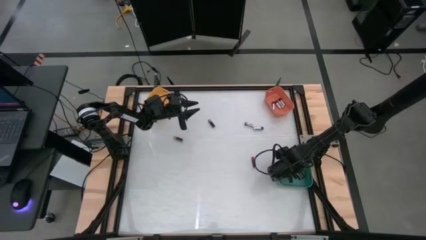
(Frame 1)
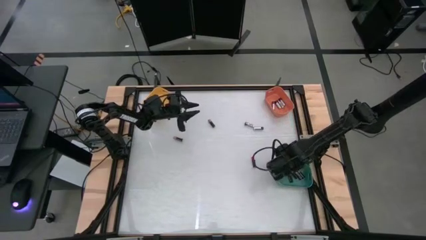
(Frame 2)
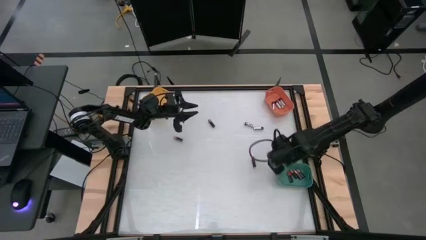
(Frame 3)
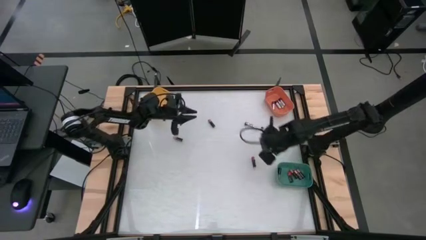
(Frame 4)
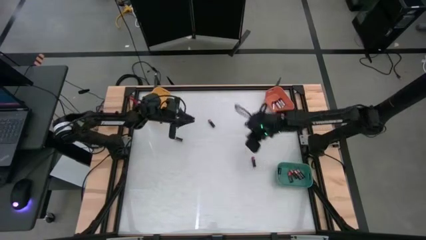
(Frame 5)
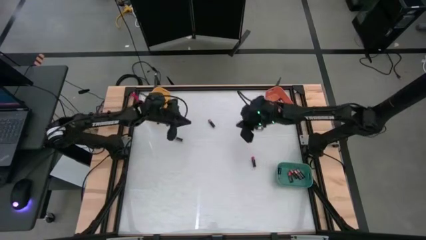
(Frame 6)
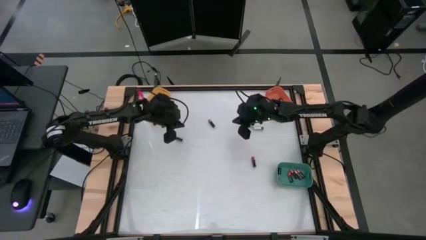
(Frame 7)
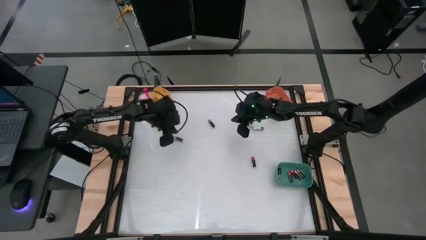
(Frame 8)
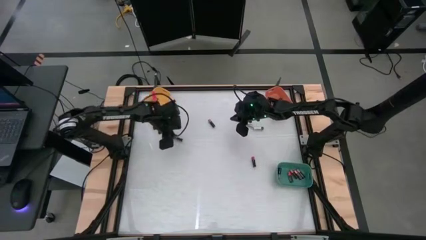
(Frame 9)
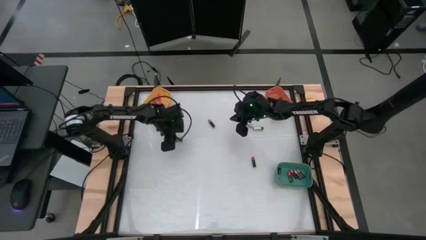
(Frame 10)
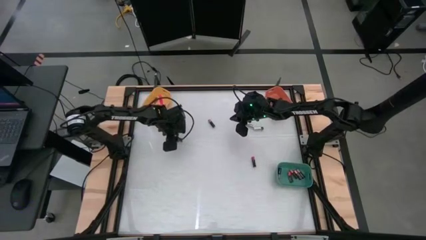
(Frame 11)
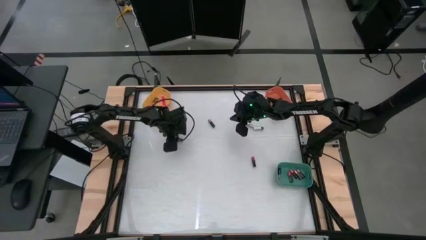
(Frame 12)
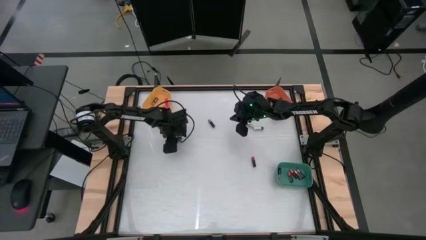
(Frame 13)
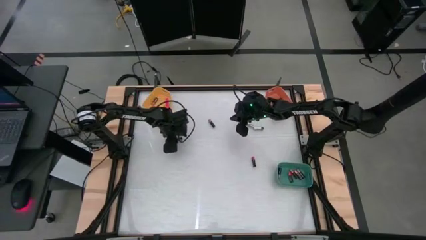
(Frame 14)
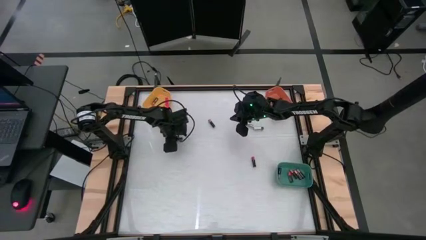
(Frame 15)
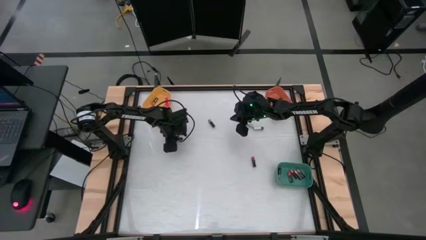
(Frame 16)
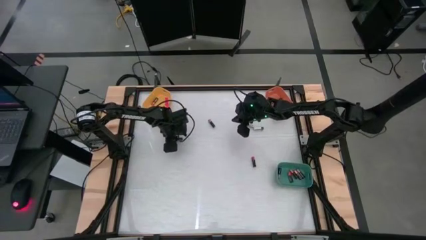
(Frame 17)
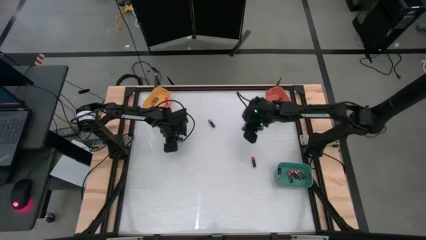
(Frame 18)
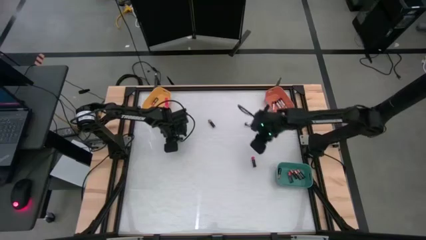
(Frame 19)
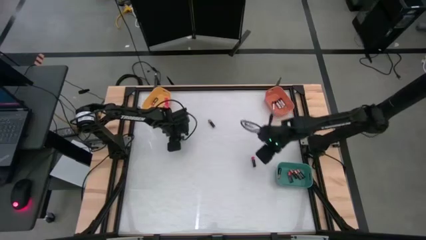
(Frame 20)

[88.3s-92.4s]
Task: Sort batteries
Put the brown battery into the green bin

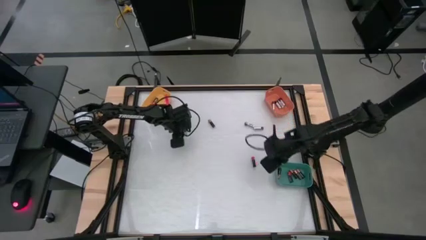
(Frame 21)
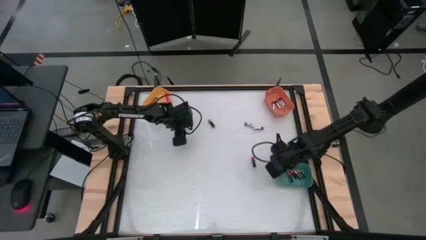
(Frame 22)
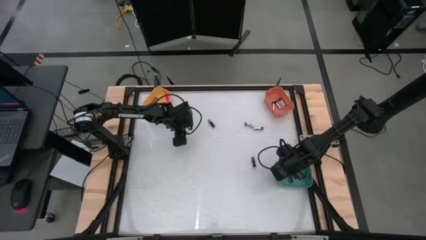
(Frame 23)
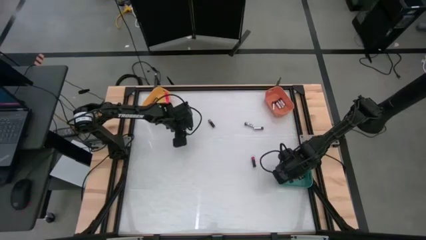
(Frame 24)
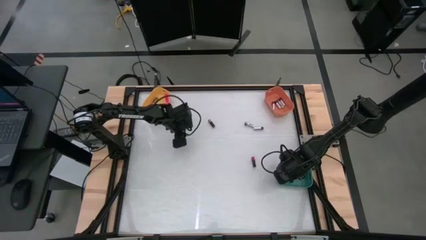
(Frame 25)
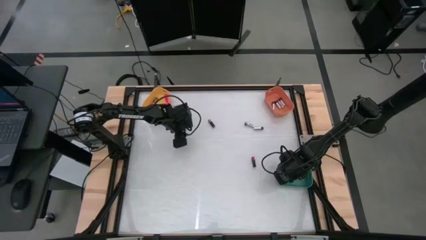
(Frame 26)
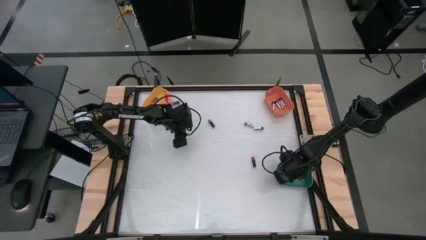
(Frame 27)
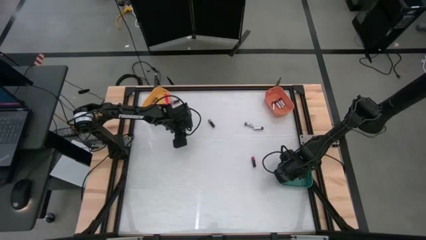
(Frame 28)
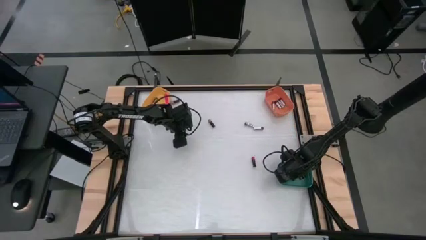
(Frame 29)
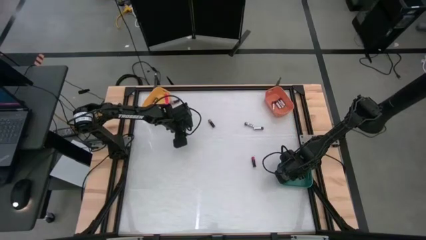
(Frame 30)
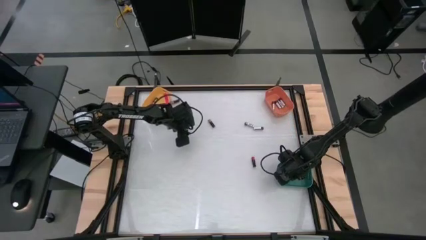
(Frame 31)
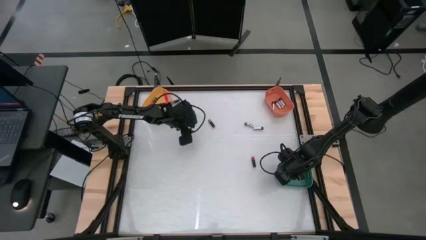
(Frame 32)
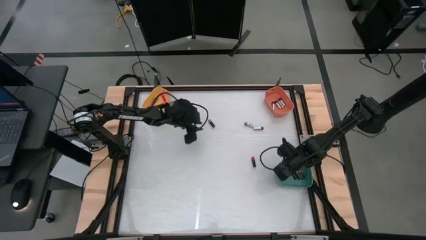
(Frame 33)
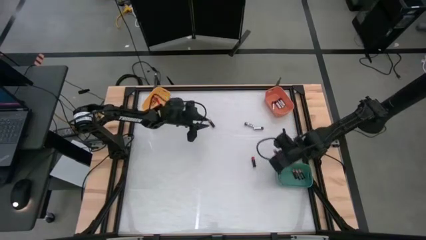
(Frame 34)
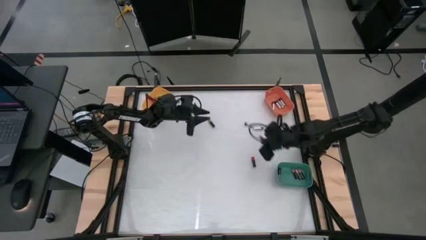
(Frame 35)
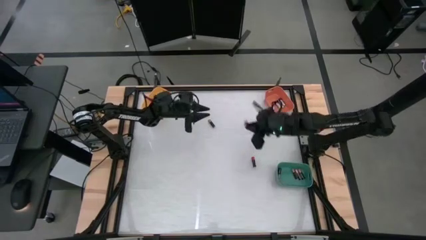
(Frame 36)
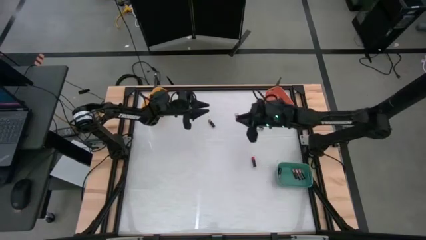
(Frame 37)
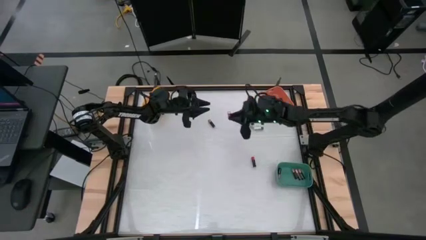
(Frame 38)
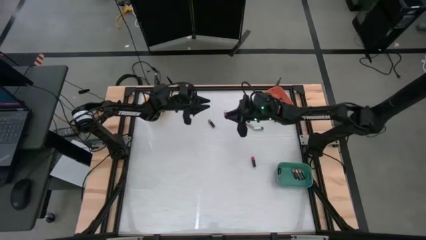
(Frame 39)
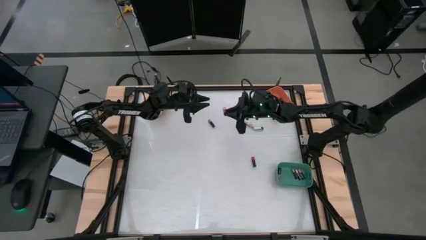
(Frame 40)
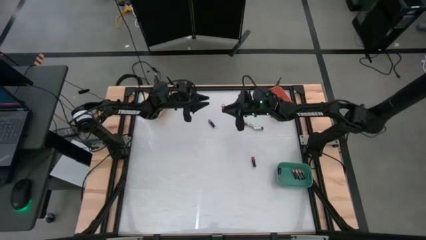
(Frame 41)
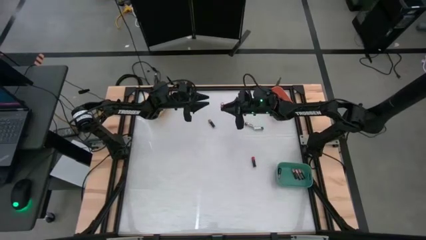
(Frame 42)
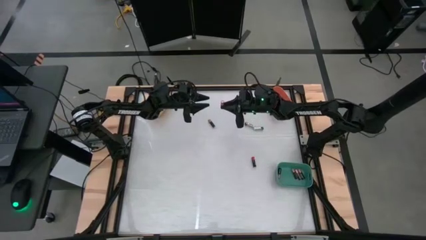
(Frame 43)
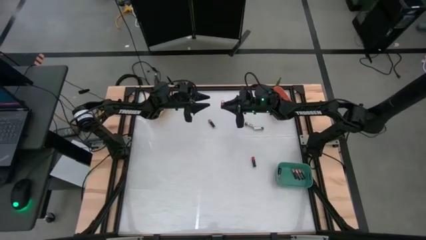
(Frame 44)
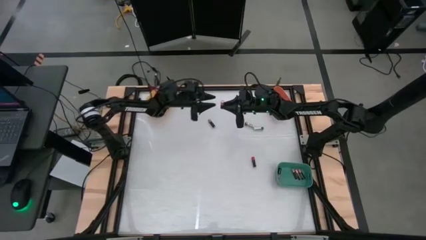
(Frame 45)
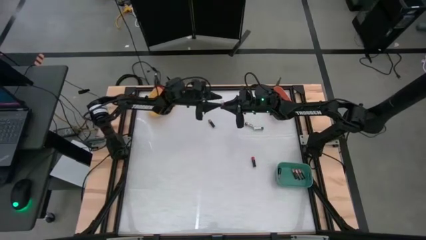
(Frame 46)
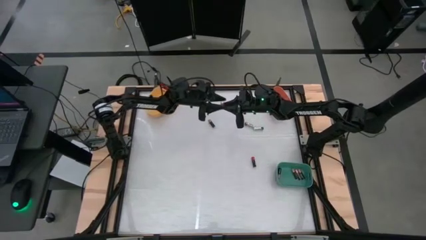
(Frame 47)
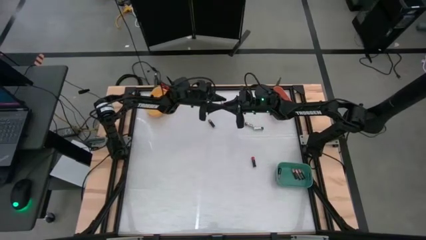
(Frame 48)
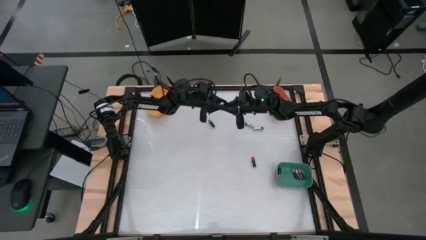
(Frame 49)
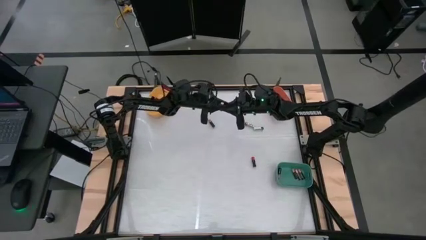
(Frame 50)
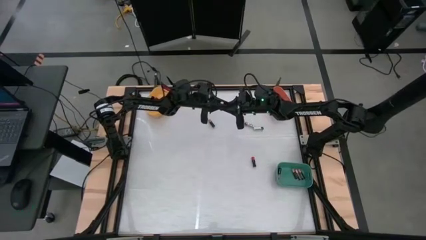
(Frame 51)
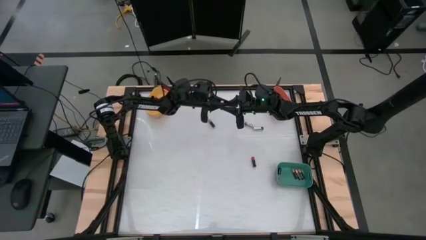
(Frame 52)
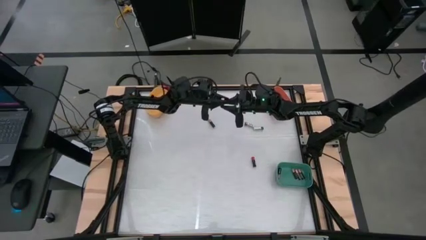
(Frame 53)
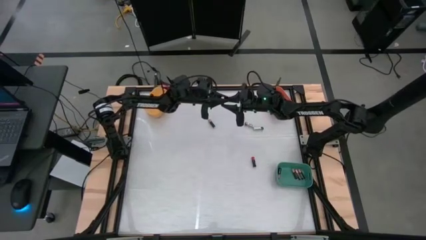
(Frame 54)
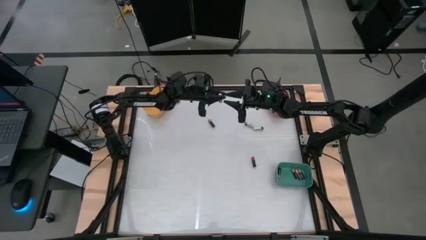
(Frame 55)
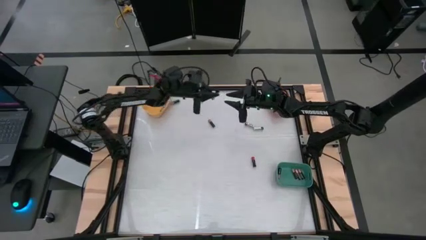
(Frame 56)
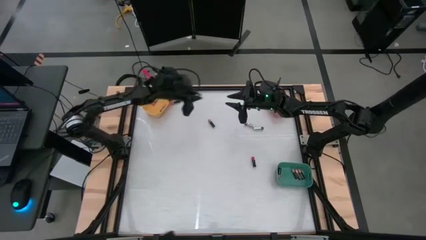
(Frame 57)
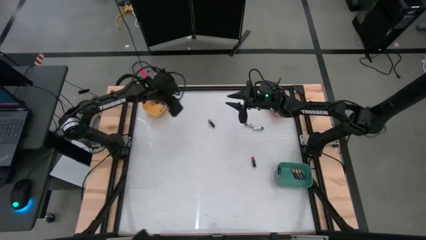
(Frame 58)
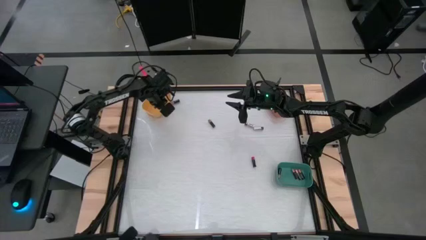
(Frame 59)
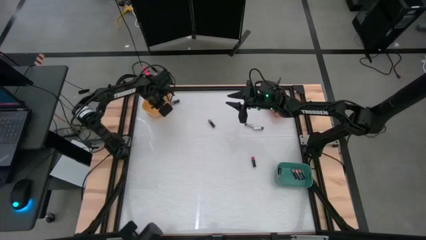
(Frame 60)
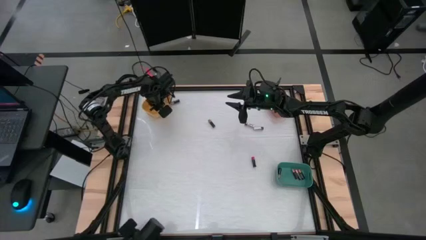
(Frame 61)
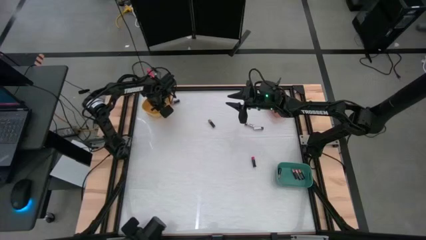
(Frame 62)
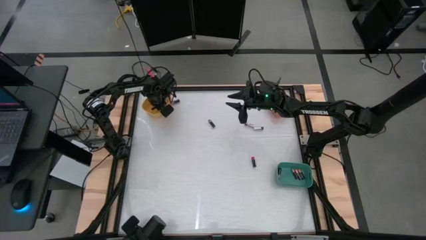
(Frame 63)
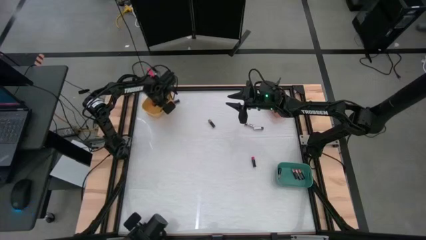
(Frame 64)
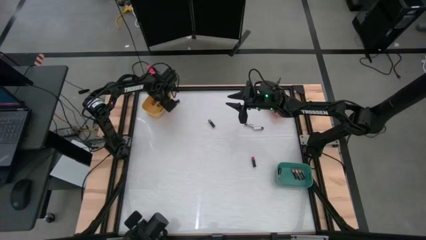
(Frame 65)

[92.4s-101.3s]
Move the red battery from the green bin to the yellow bin

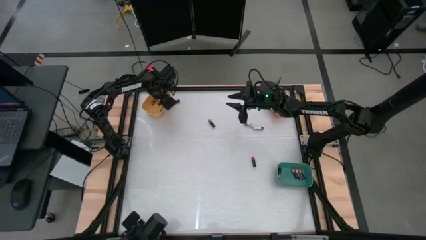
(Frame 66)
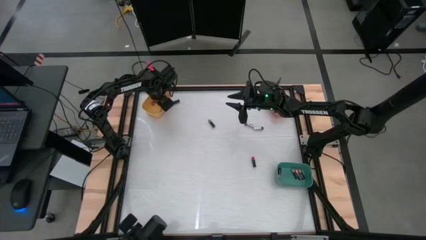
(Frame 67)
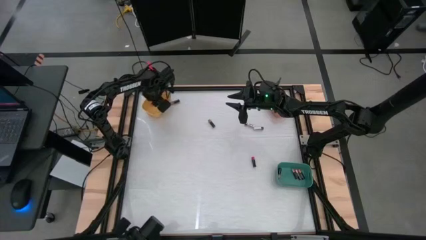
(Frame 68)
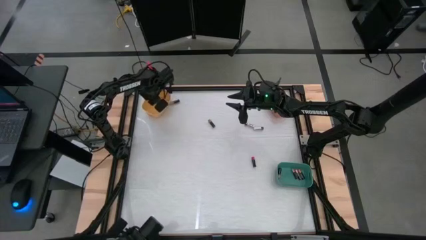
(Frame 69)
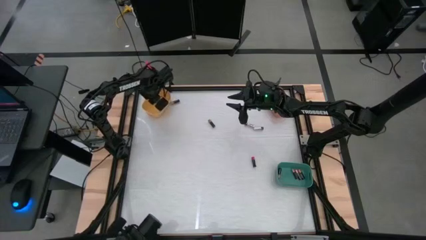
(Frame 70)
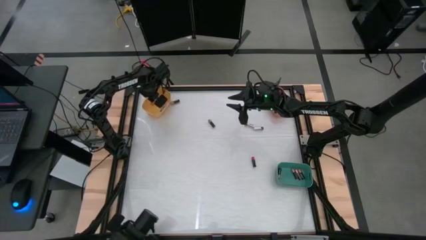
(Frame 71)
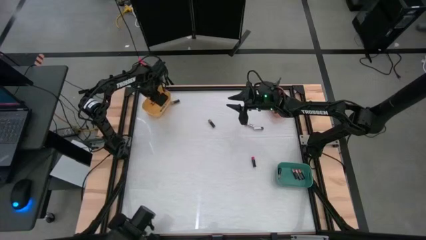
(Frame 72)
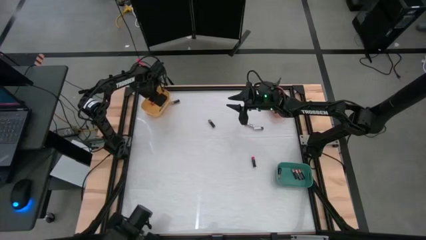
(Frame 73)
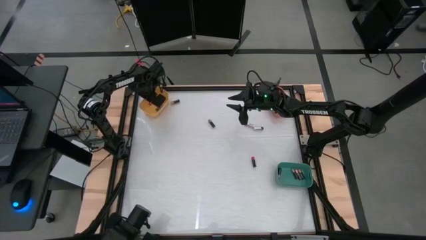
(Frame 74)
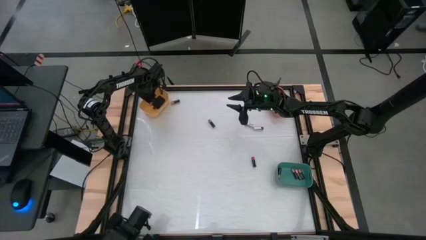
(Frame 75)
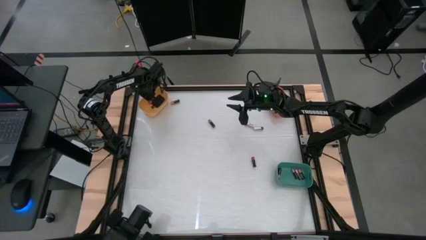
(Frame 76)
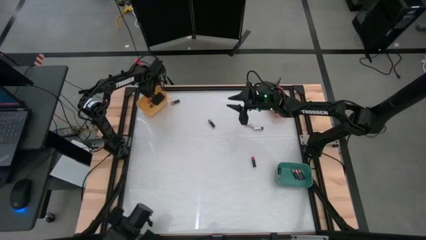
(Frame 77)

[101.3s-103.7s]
Adjust the yellow bin to align the position

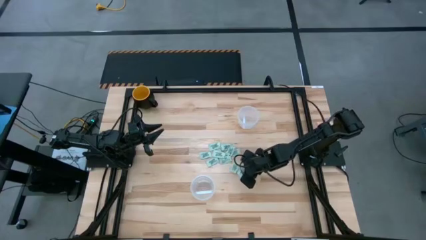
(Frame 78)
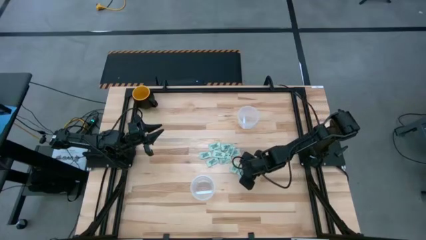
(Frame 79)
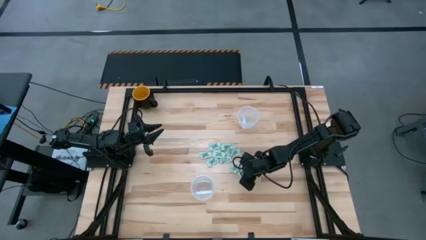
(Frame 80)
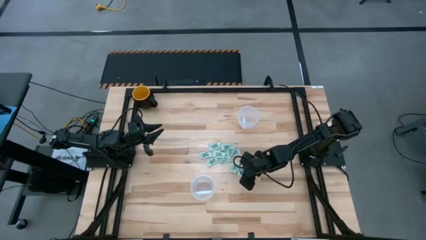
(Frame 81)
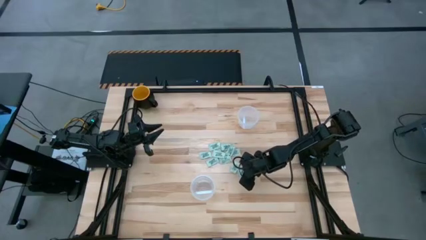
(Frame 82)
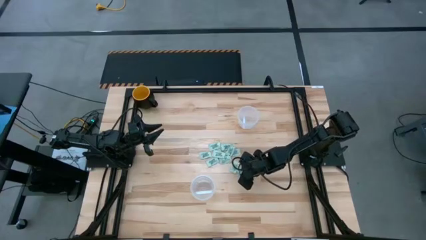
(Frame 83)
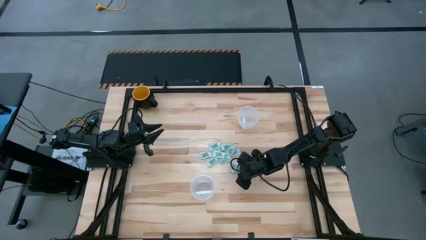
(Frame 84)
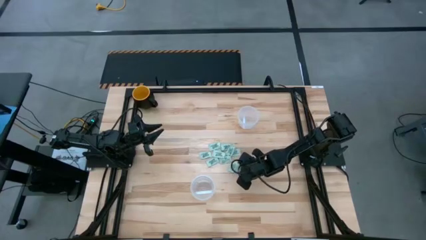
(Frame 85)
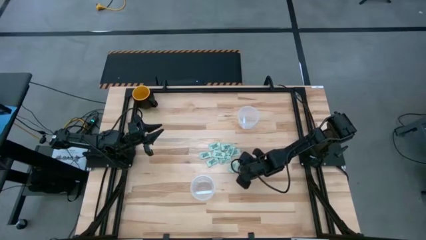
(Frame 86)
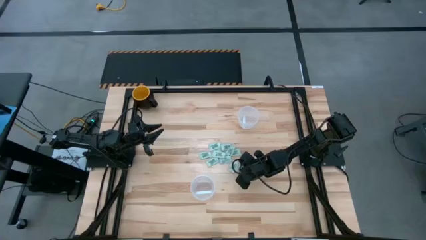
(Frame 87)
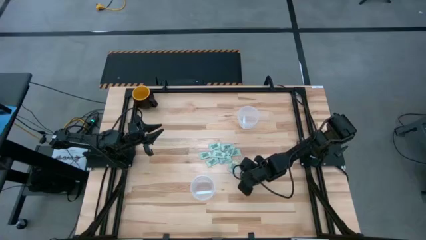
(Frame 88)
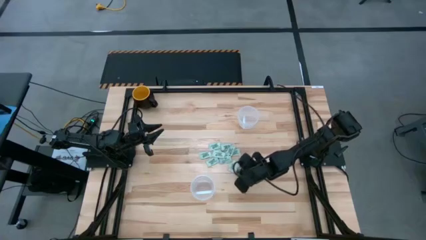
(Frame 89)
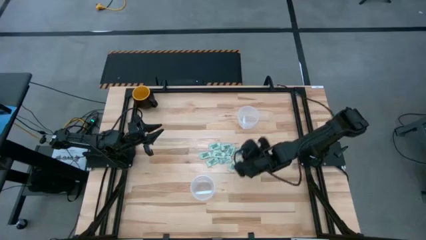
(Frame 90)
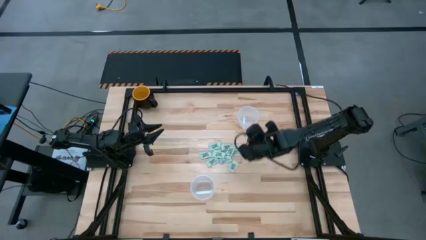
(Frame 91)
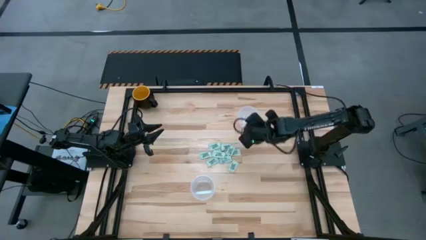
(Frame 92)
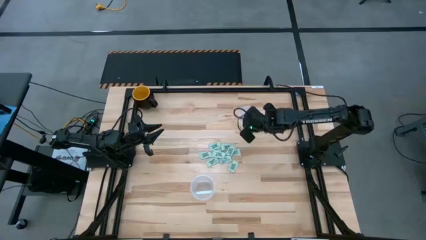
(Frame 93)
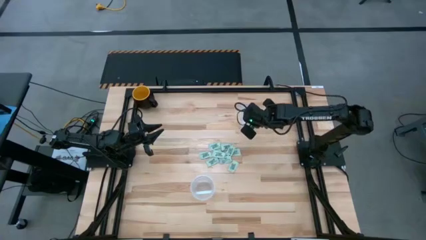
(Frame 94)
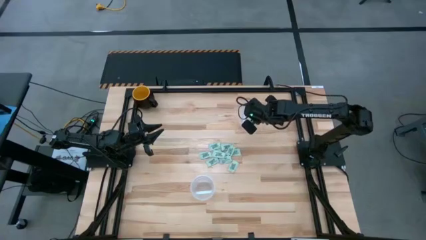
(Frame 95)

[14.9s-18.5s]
Task: Pick and place Stevia / Truvia into bins
Put the stevia packet into the top transparent container
